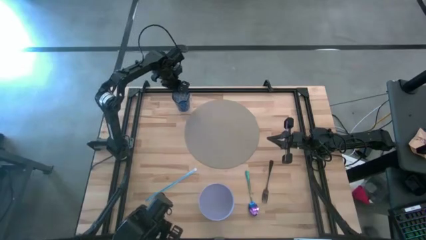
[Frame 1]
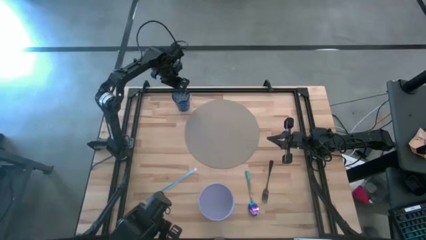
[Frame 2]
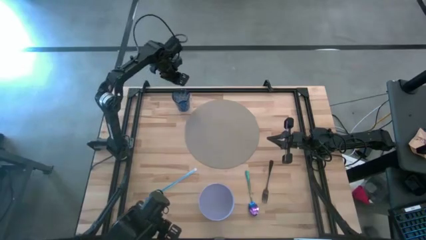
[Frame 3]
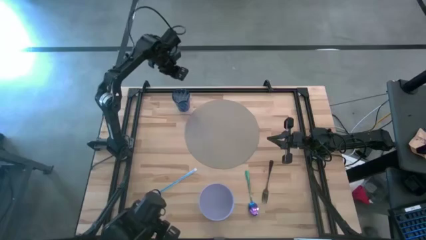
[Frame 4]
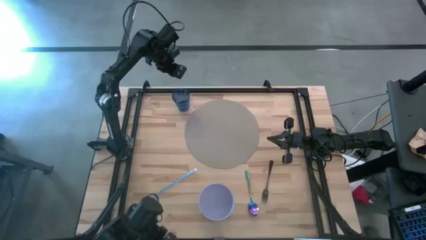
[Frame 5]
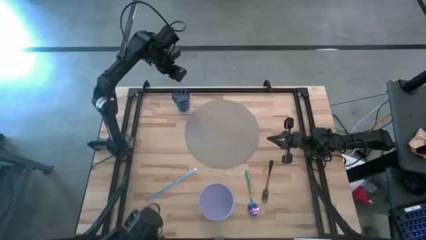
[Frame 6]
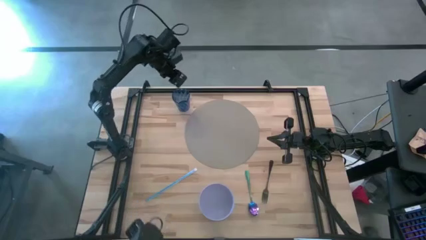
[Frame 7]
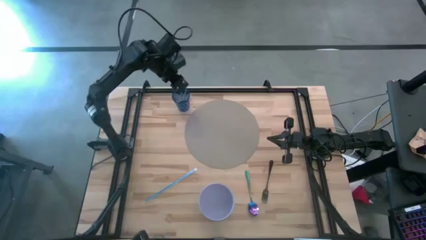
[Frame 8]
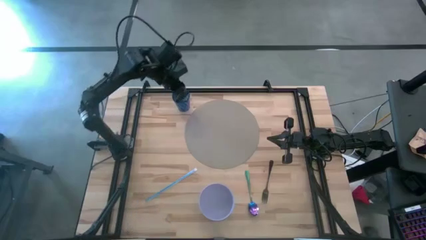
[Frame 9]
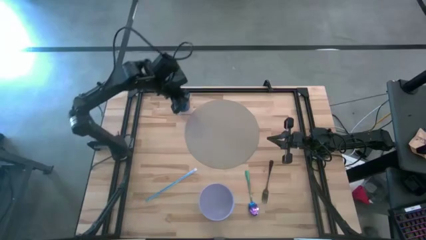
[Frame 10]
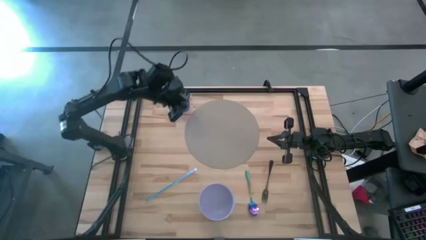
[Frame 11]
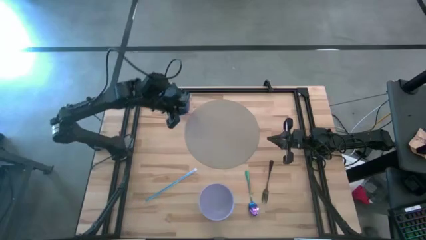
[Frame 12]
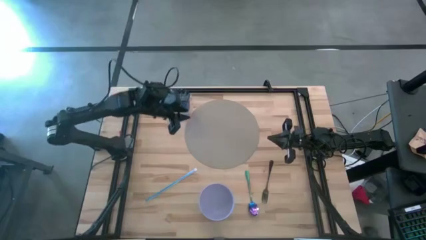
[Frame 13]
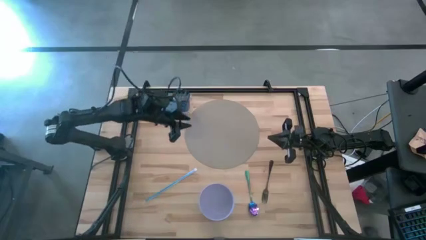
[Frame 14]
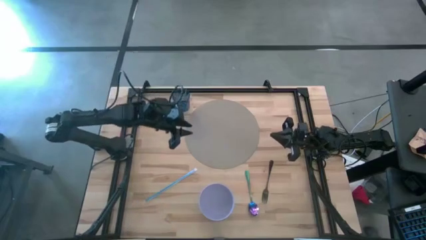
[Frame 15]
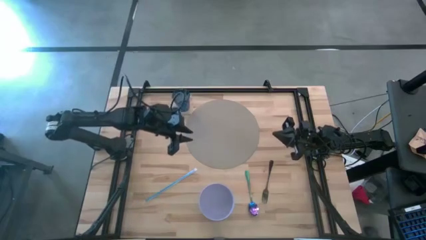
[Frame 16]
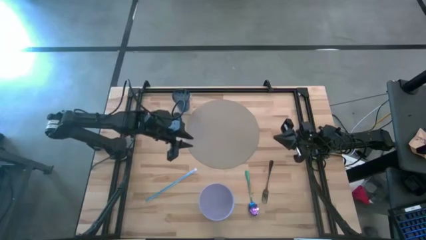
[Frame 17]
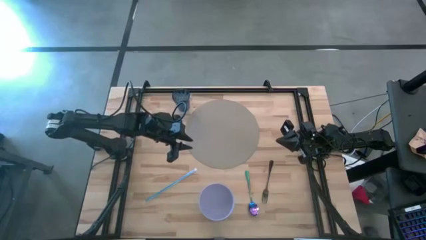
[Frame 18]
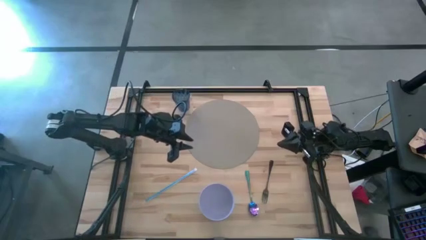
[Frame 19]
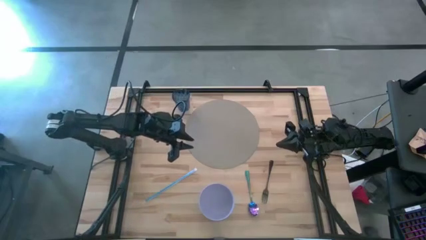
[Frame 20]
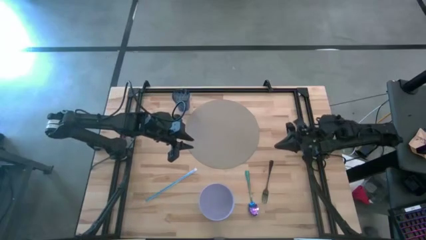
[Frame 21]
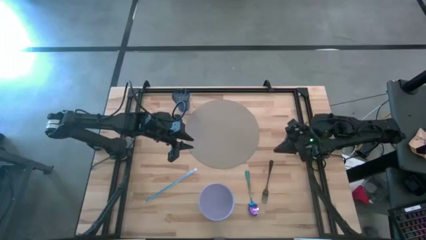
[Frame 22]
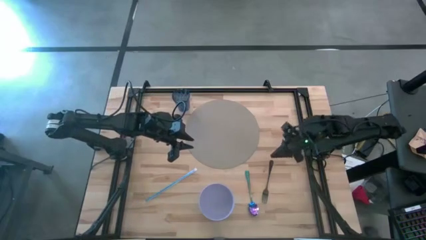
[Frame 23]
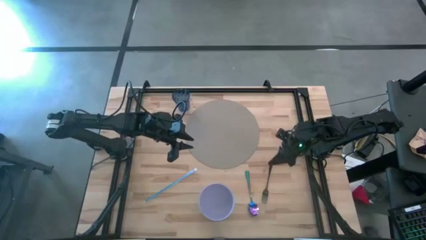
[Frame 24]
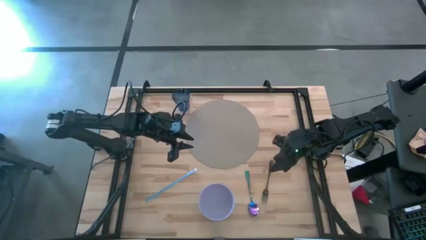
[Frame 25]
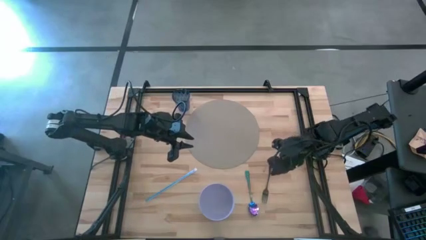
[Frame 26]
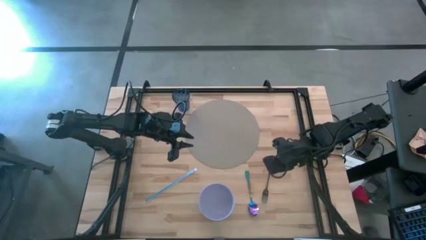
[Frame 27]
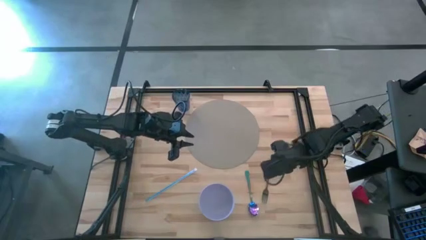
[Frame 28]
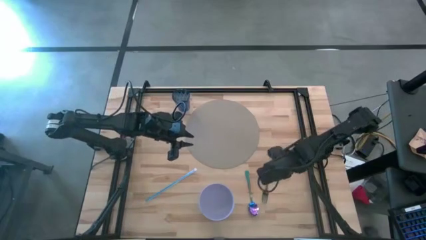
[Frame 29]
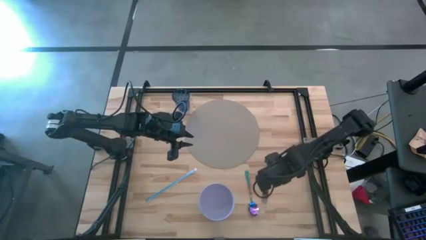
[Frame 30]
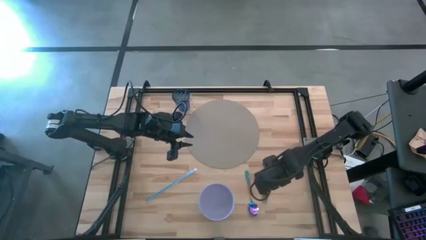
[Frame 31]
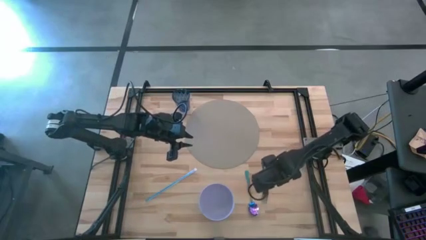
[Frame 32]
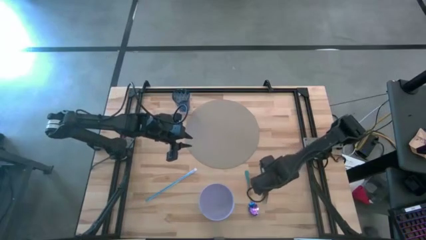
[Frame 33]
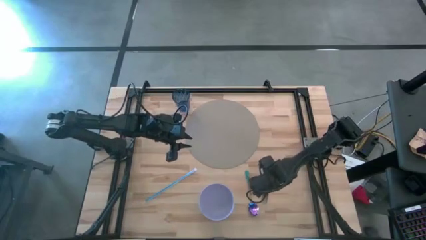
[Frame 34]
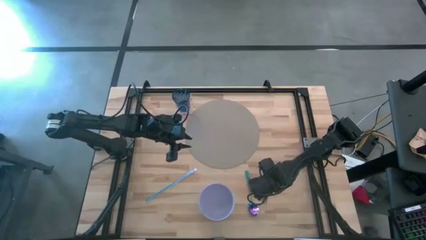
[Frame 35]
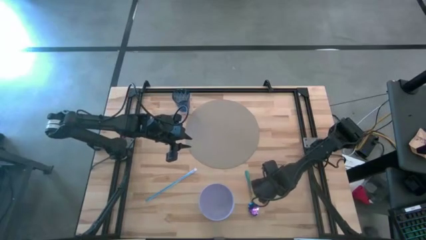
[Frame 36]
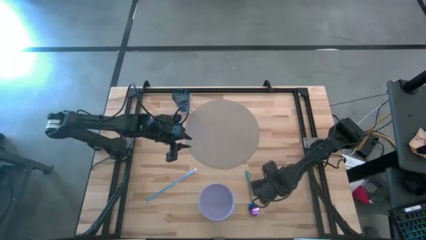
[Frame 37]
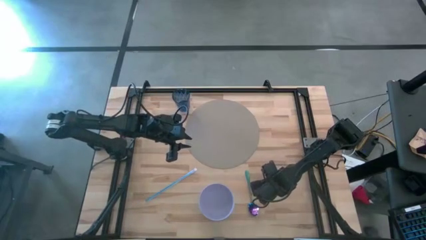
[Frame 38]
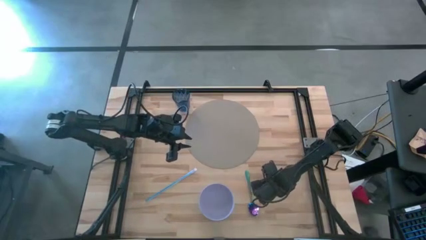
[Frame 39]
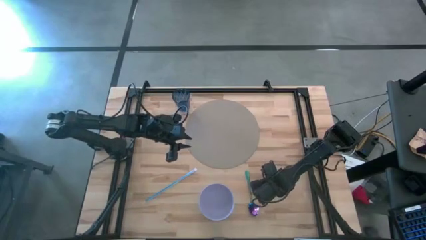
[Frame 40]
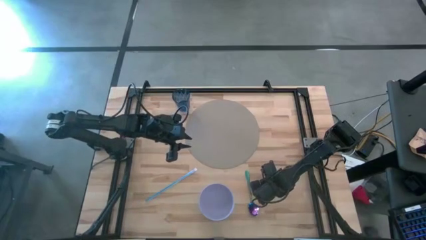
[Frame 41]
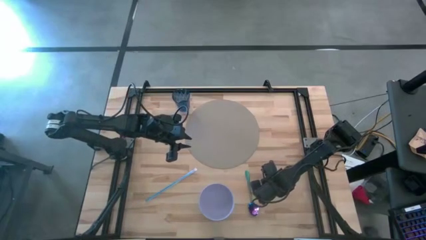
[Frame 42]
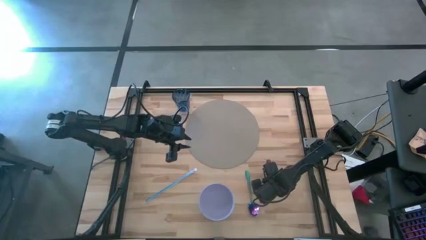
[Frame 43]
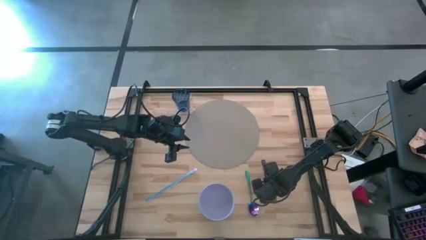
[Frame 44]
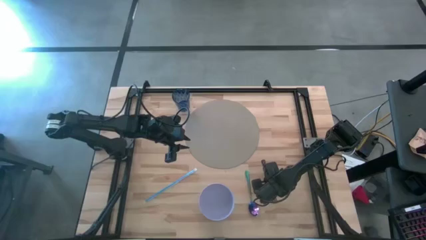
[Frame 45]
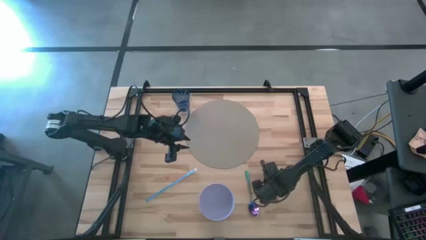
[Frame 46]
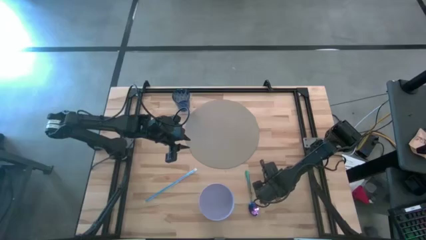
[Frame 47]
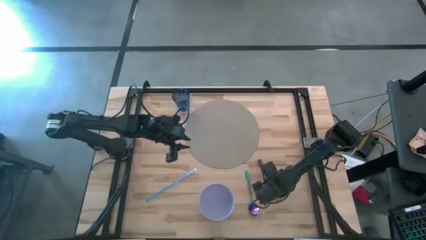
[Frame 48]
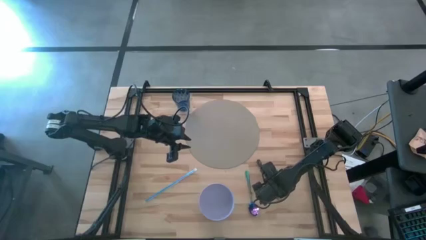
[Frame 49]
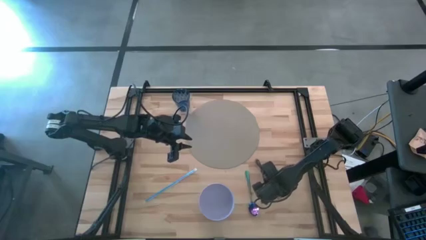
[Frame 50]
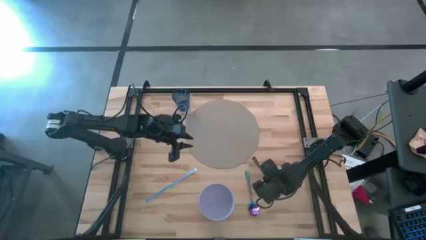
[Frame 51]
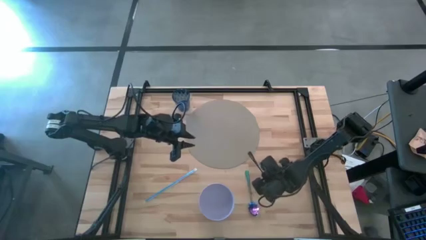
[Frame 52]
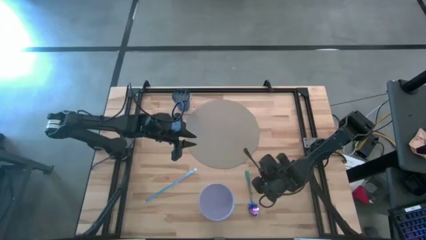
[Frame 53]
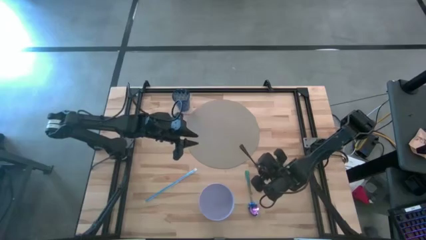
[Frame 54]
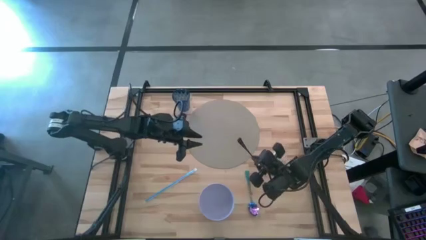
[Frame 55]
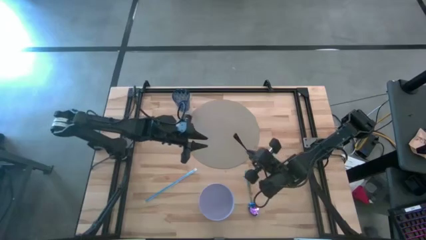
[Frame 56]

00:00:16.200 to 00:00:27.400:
Task: Pick & Place Utensil
Put the black fork into the purple bowl

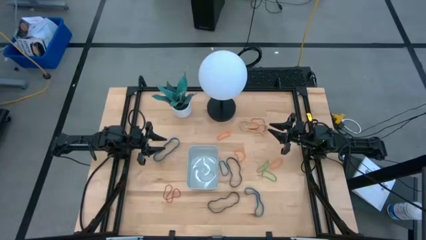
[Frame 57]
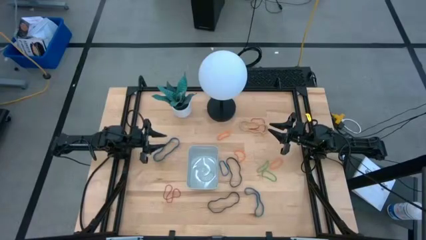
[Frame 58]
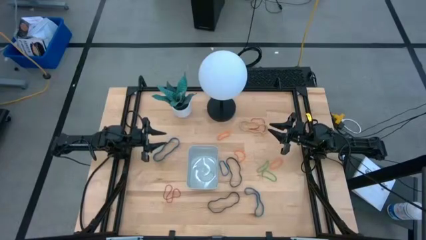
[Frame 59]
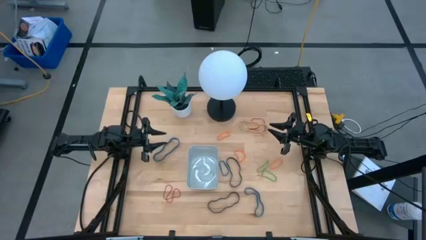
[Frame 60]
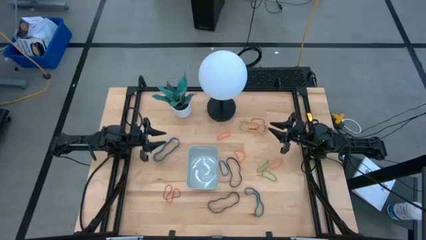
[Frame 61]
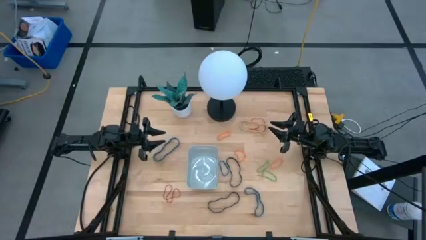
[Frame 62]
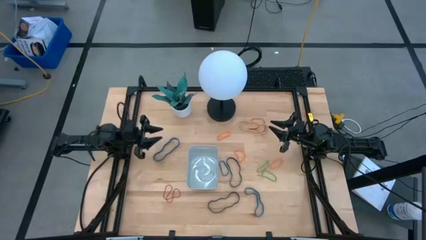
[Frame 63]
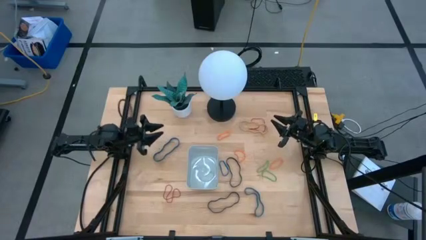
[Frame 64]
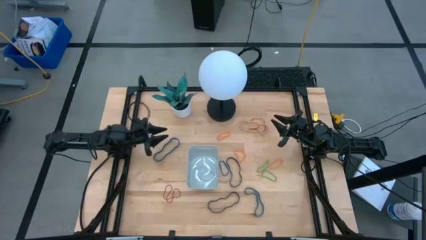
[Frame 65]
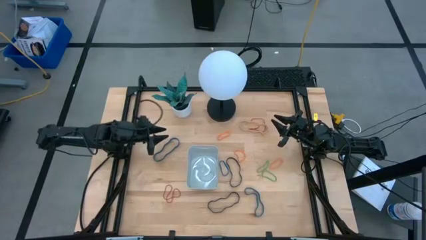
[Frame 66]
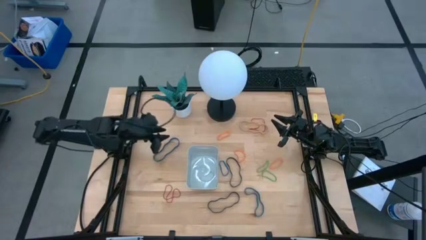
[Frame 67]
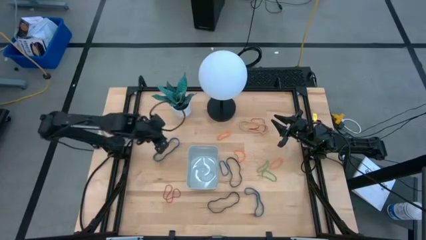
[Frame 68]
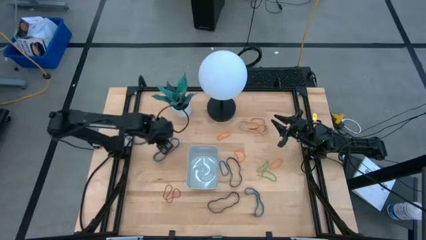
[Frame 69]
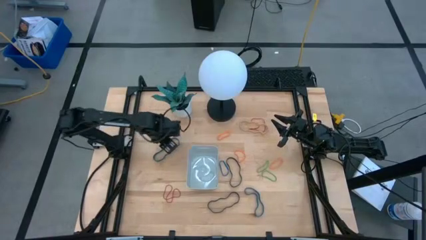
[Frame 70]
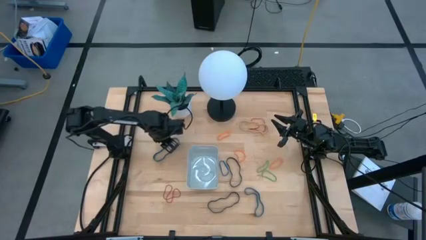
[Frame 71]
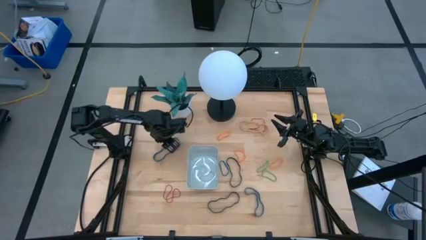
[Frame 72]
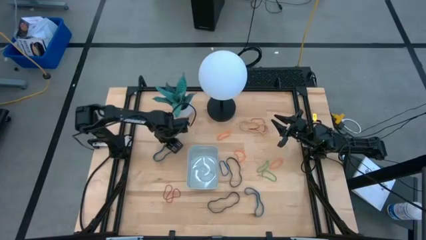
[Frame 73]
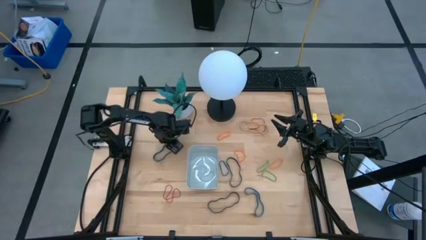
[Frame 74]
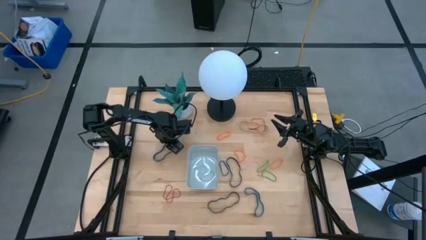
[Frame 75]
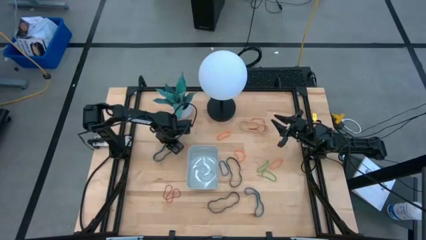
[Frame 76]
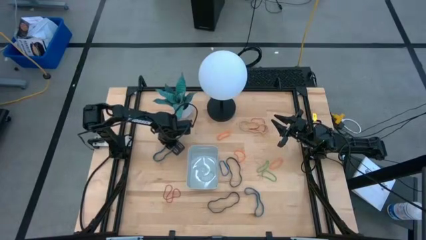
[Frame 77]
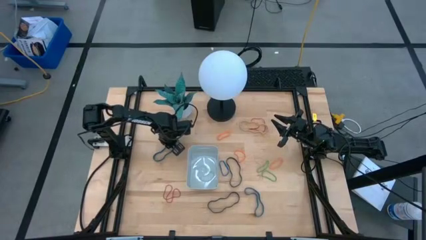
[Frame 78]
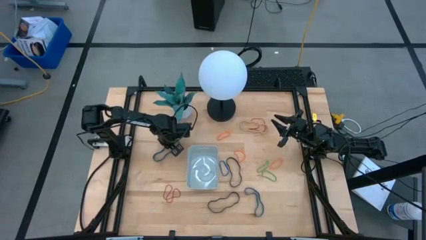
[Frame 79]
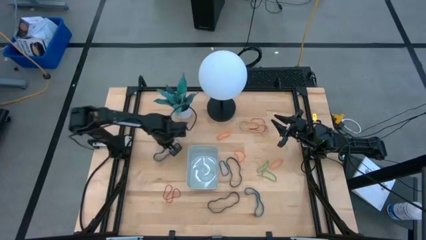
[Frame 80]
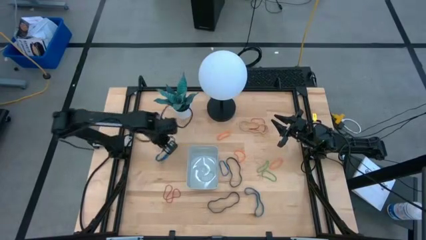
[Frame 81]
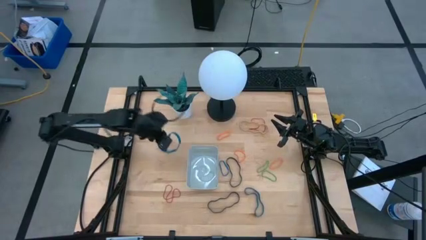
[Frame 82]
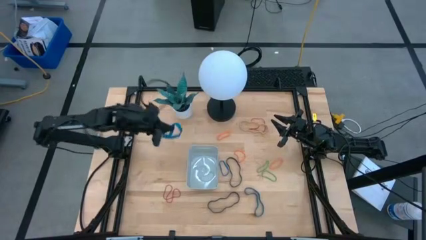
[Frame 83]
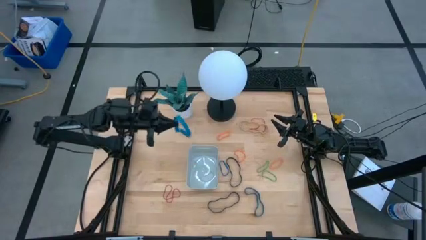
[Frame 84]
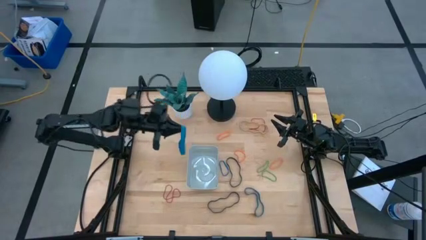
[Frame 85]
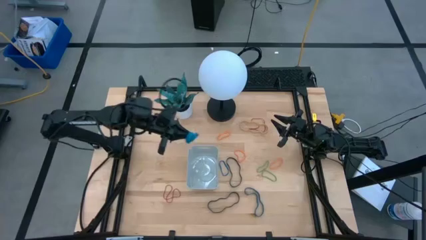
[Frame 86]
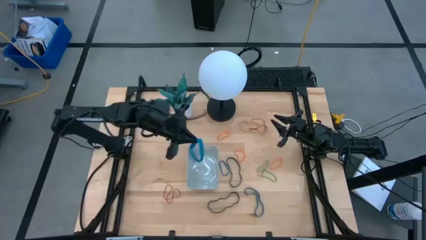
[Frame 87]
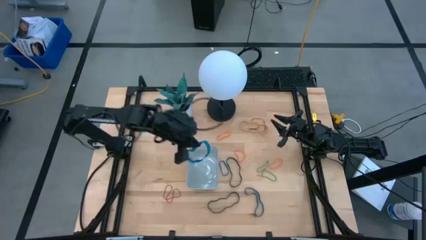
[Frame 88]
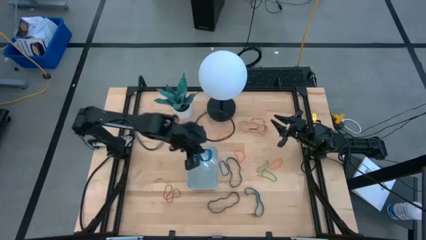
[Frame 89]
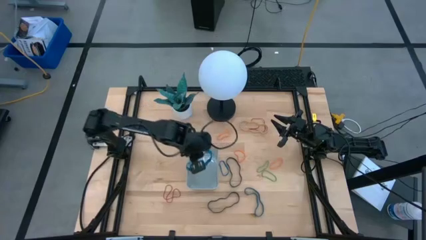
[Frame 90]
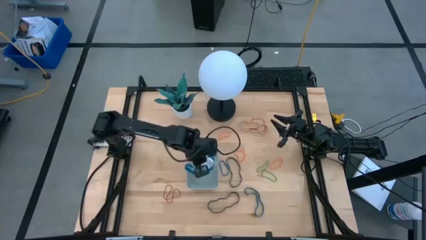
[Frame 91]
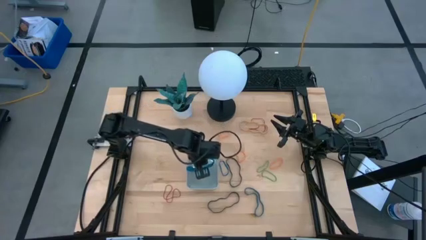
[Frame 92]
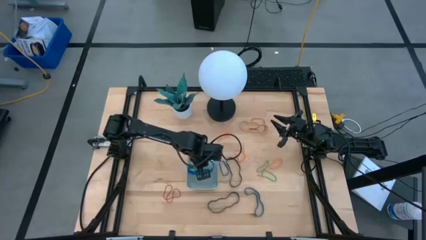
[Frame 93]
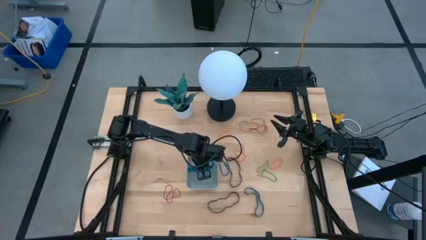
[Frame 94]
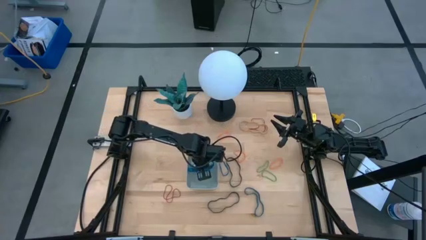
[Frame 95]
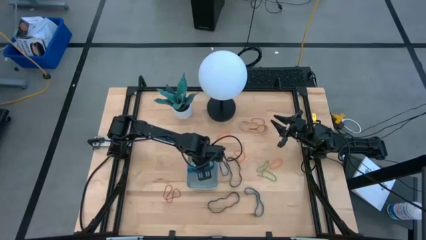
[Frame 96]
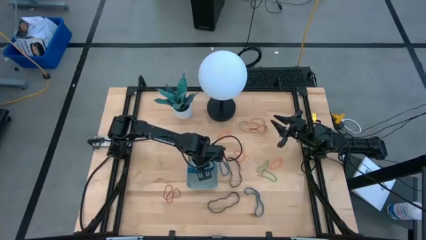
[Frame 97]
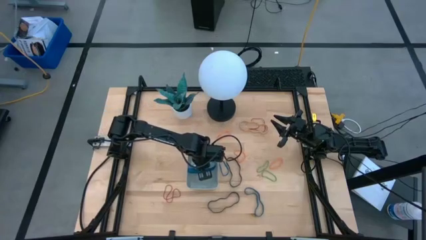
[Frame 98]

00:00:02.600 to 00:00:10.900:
Task: Pick and place rubber bands into bin
Put the top large blue rubber band into the gray bin
